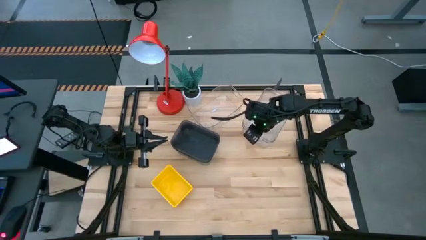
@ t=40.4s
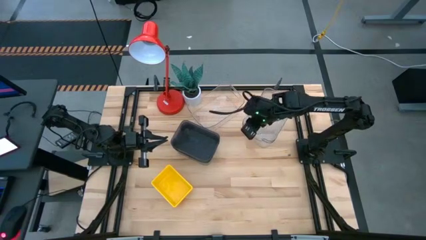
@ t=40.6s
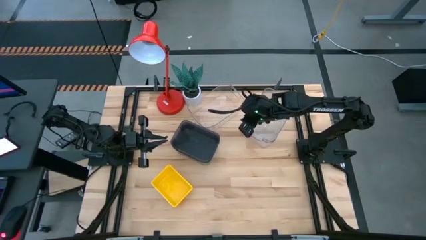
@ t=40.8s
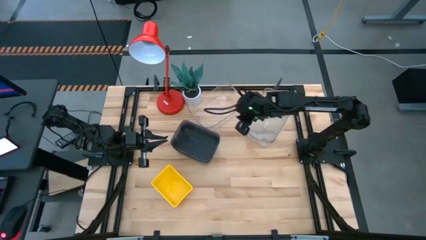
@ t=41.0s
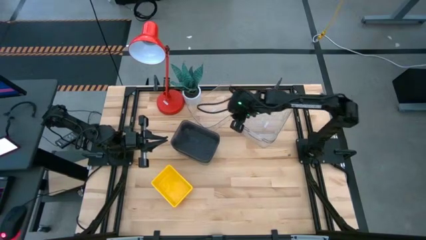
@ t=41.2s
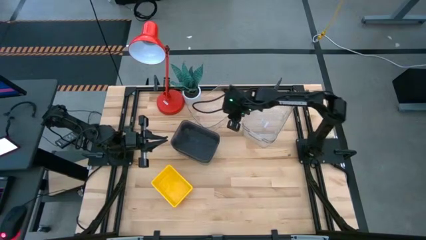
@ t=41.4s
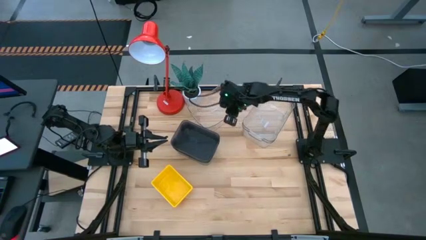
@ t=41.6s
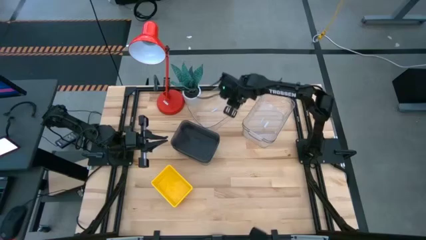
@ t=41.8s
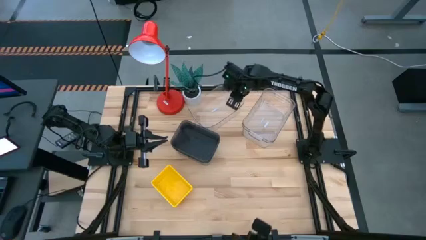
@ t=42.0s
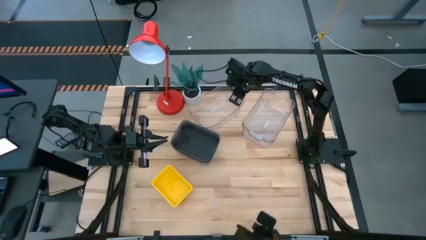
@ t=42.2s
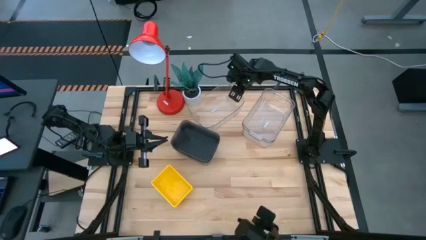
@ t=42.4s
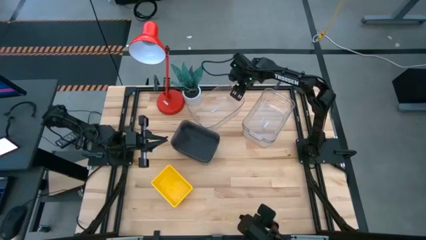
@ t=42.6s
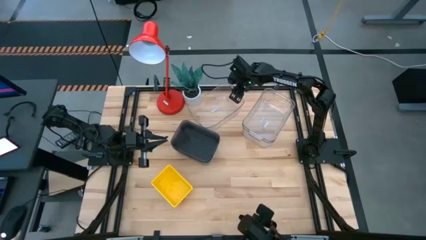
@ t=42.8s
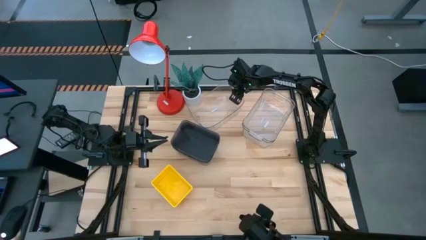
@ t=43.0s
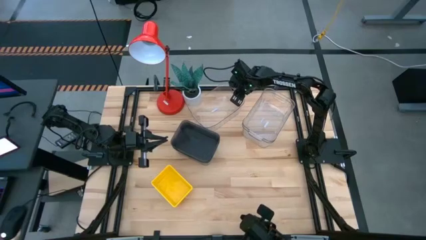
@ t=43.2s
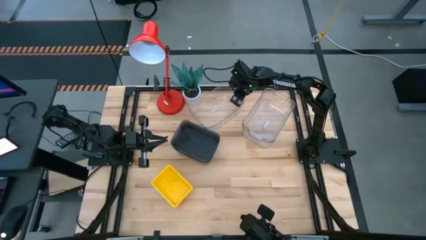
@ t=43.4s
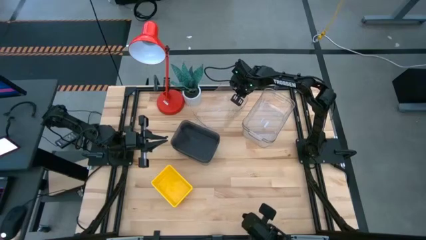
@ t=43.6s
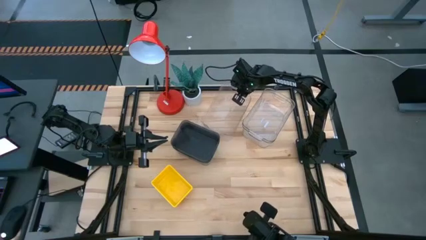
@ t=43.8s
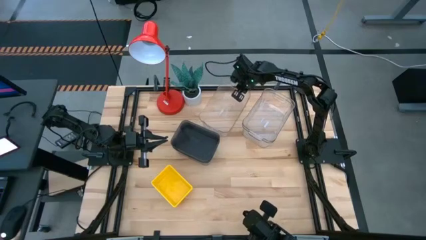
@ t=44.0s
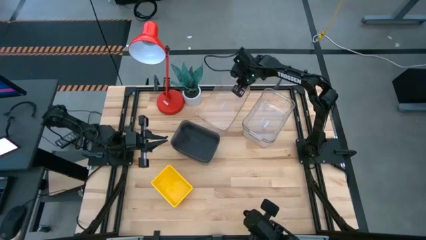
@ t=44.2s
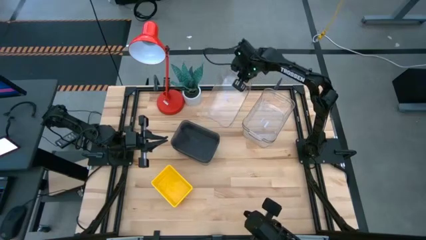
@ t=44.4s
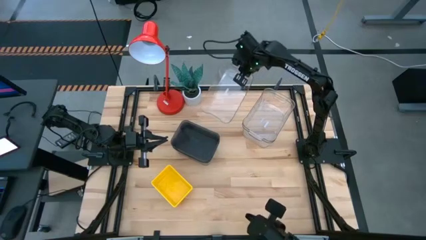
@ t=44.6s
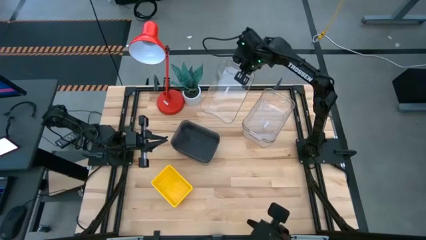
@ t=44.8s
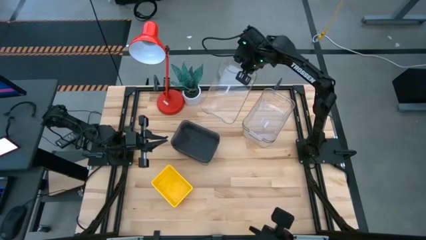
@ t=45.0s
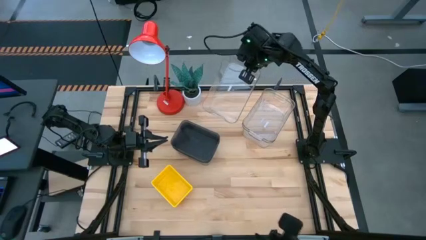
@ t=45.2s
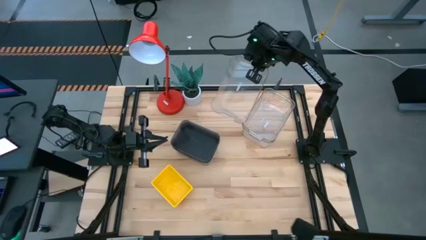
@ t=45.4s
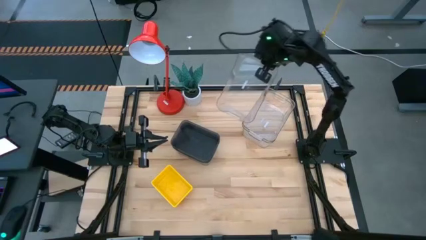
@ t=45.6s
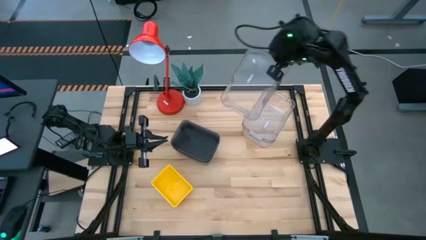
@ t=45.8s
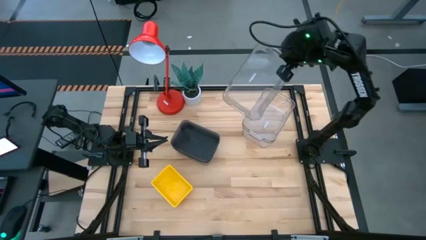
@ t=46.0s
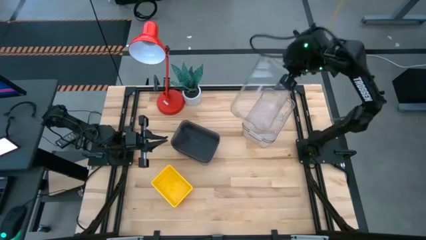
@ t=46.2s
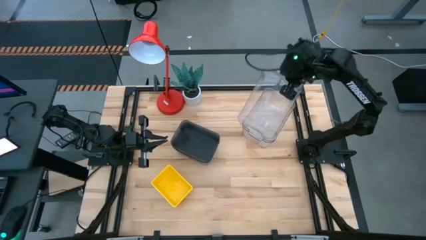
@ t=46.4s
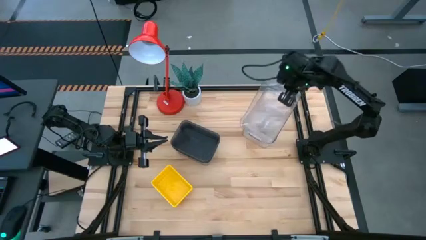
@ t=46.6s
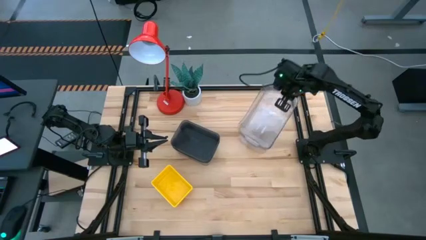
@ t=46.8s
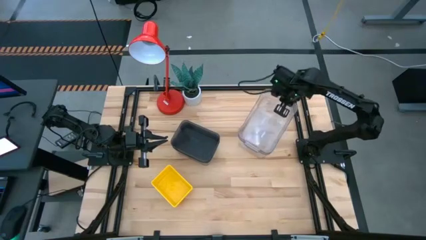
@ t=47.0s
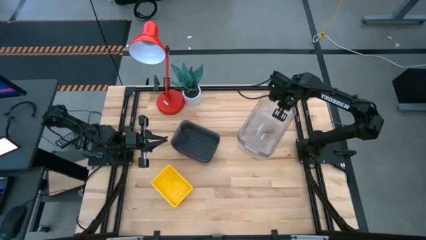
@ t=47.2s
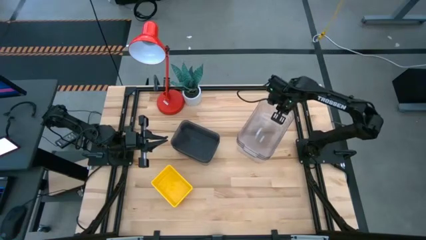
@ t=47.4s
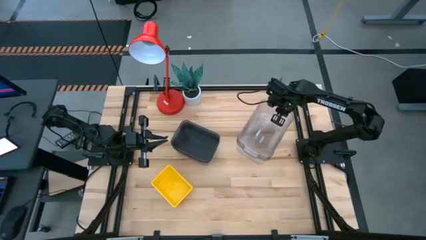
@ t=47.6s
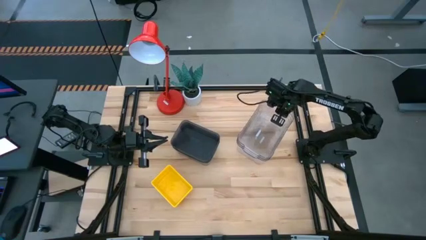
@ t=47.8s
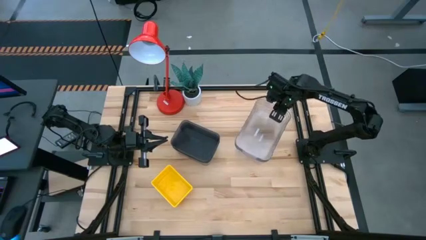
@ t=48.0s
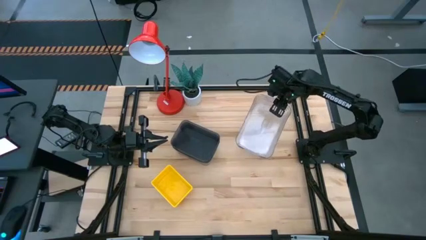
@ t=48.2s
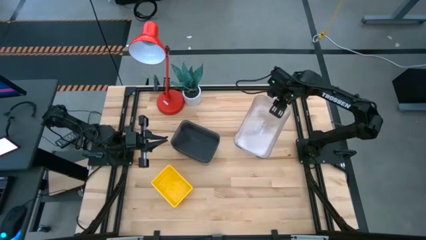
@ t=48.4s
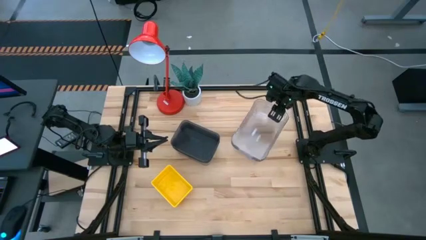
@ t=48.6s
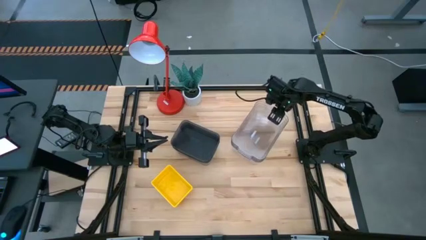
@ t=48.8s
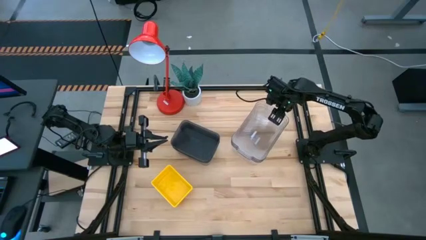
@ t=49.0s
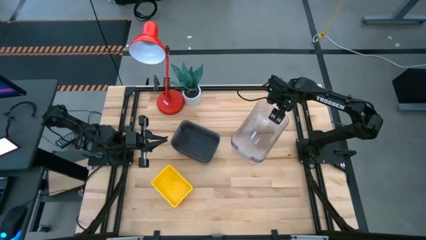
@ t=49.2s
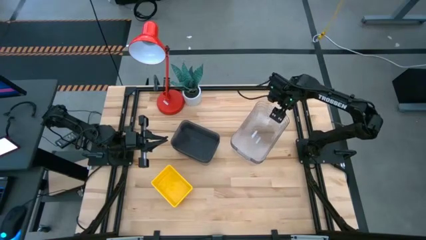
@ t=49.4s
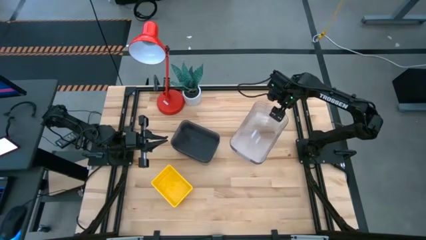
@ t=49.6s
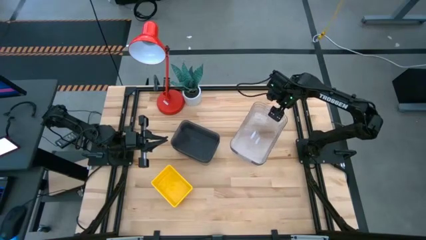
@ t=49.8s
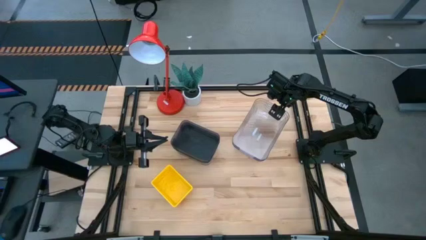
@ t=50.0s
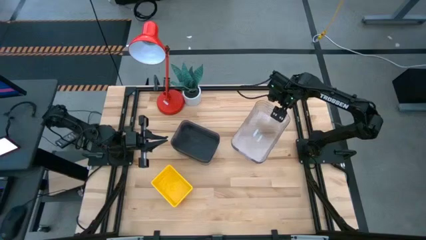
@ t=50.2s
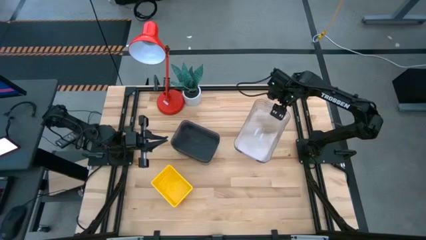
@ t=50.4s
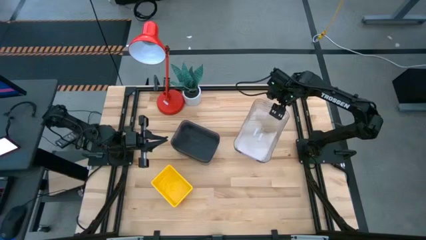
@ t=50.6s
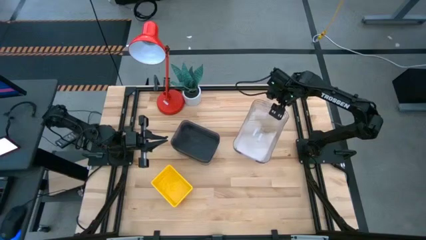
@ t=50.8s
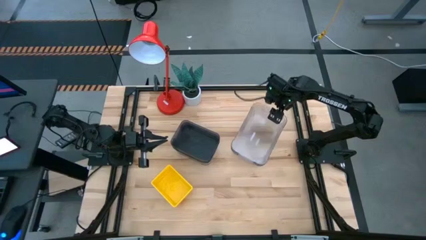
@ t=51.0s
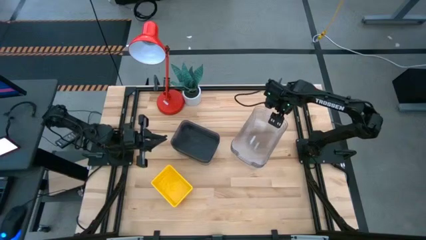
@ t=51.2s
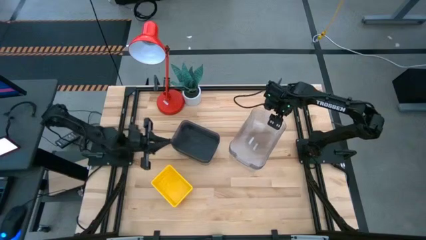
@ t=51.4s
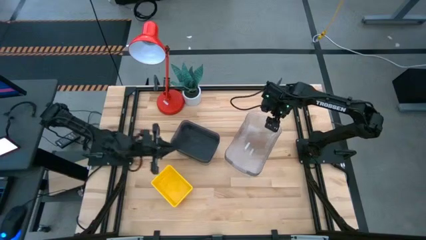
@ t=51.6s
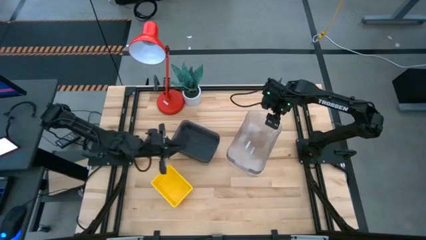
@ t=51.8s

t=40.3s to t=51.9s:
Stack the left transparent bin on the transparent bins

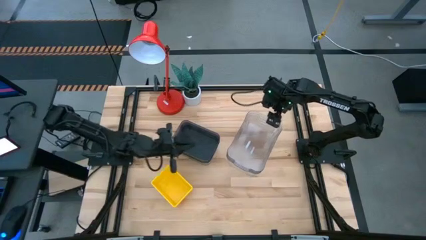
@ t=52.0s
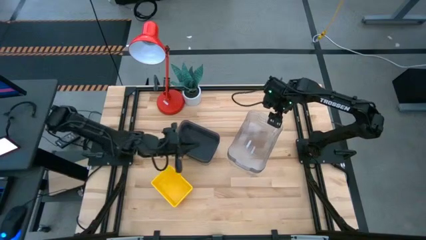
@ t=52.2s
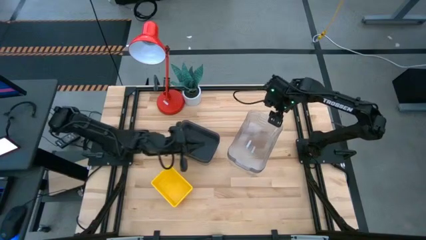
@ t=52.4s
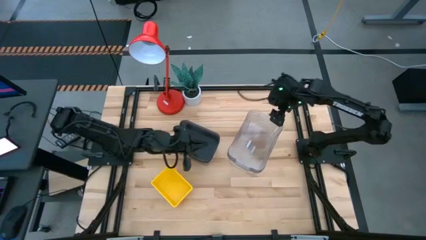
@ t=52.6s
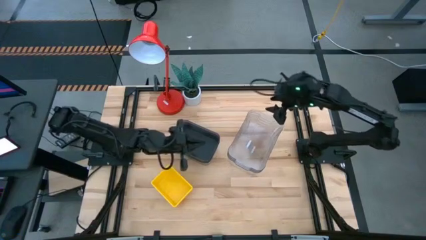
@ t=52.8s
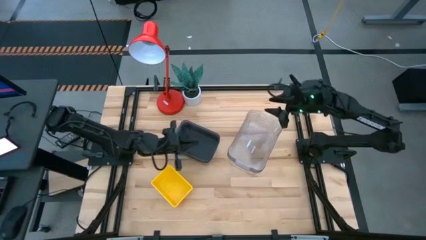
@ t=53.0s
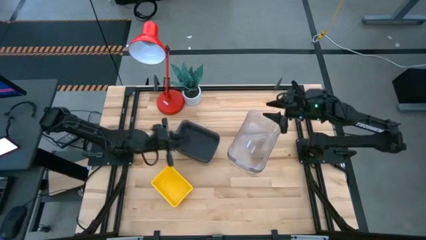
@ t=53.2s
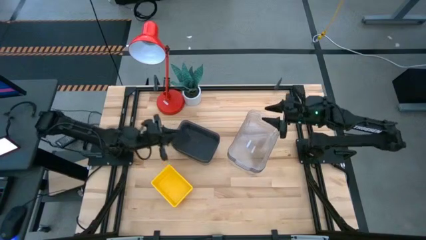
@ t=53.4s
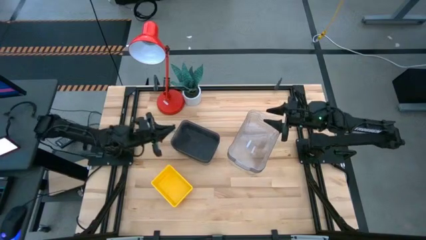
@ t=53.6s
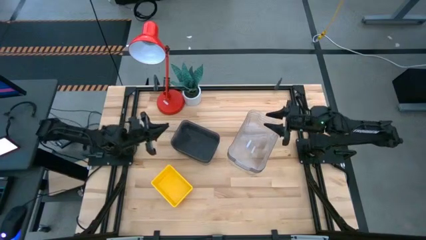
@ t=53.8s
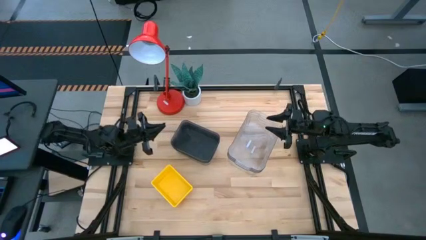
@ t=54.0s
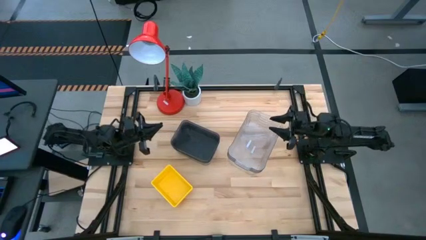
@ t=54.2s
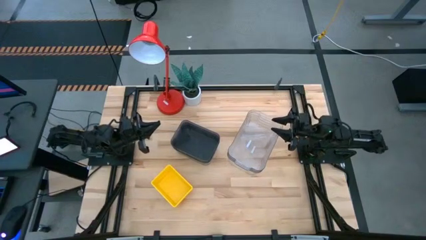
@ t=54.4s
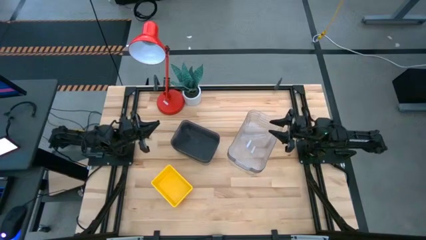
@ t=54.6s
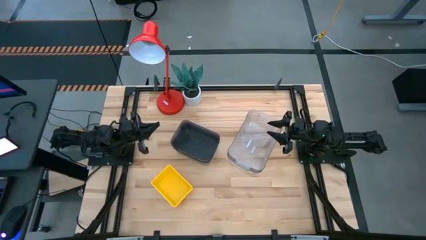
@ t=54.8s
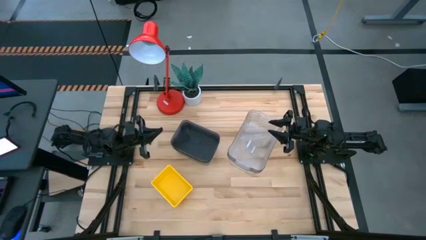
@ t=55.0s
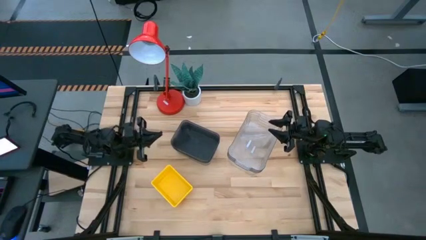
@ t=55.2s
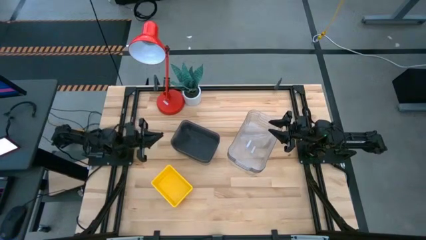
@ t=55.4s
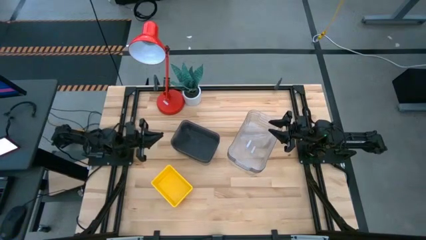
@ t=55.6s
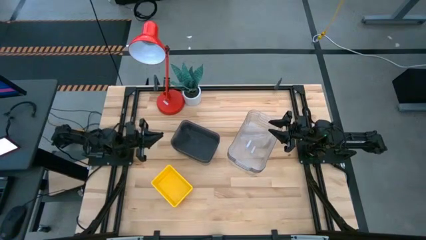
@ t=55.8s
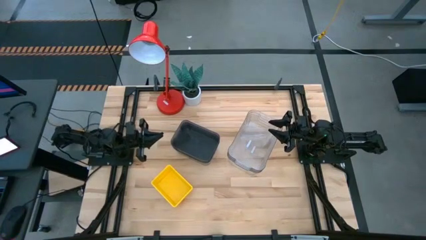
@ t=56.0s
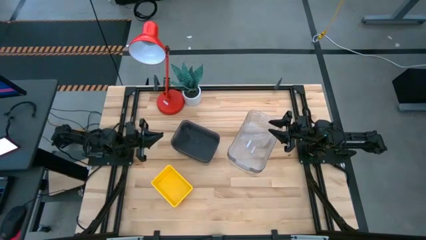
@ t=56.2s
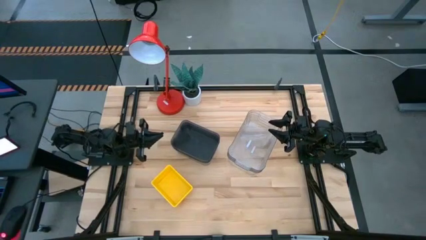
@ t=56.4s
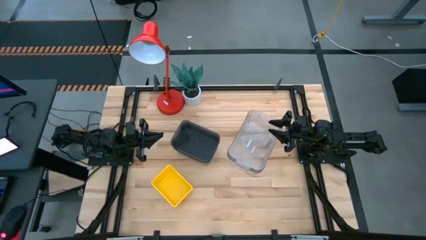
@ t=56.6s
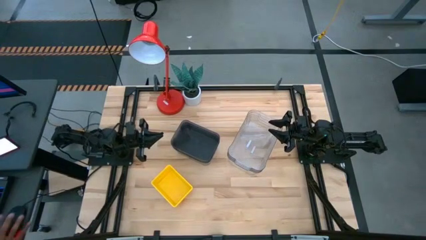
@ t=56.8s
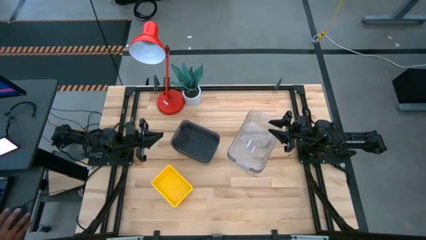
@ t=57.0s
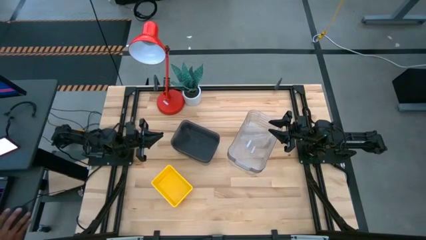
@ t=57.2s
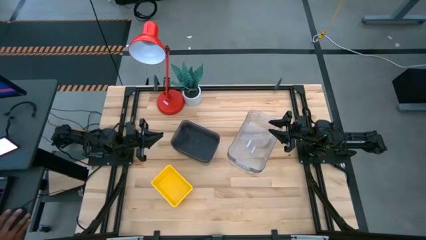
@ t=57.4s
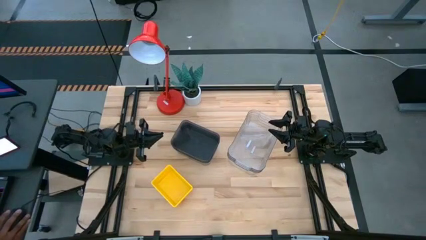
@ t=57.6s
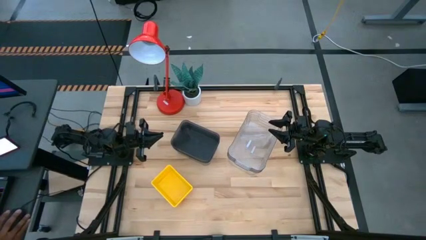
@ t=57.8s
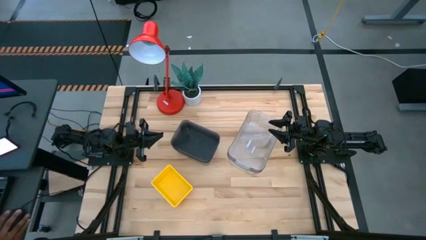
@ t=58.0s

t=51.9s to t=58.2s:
Return to Home Position
